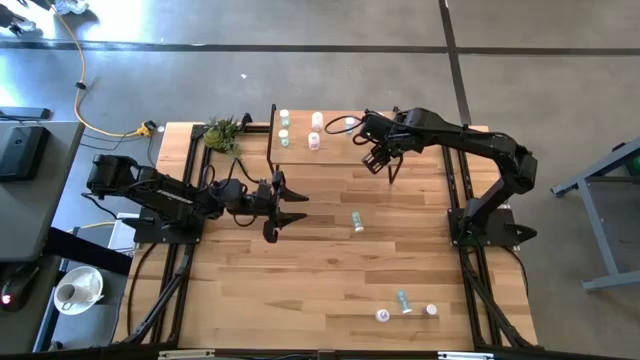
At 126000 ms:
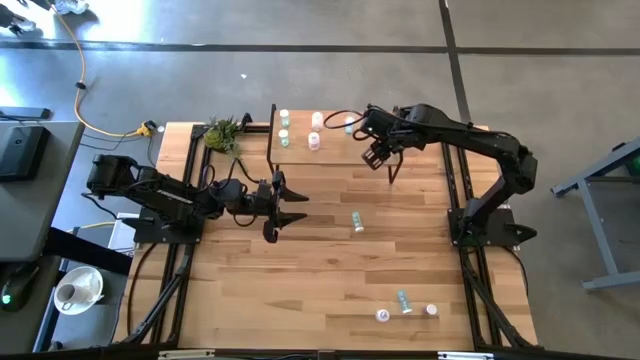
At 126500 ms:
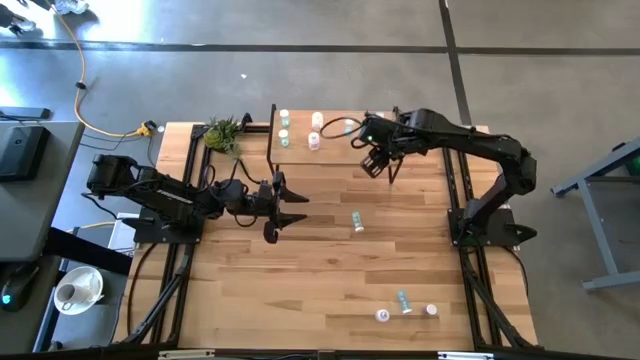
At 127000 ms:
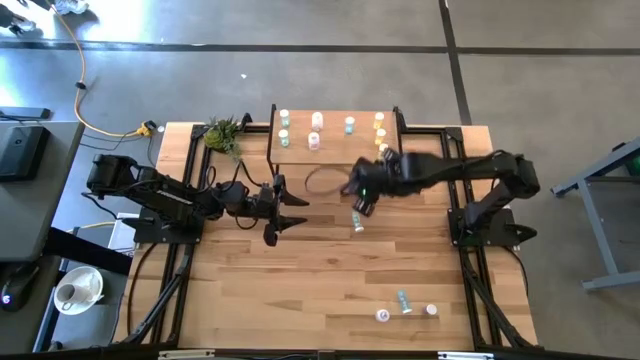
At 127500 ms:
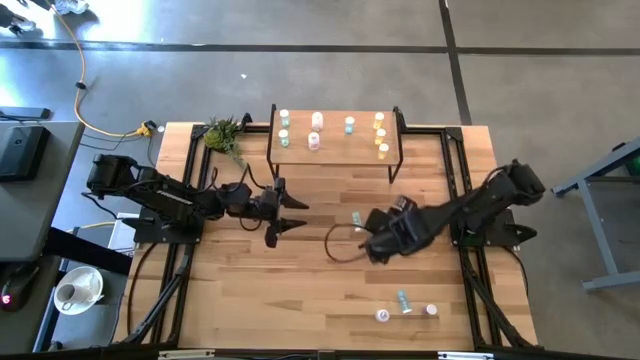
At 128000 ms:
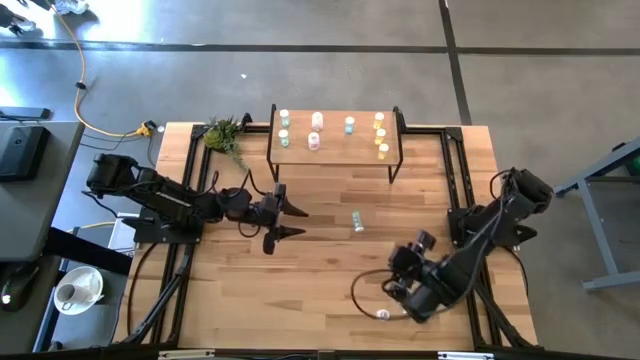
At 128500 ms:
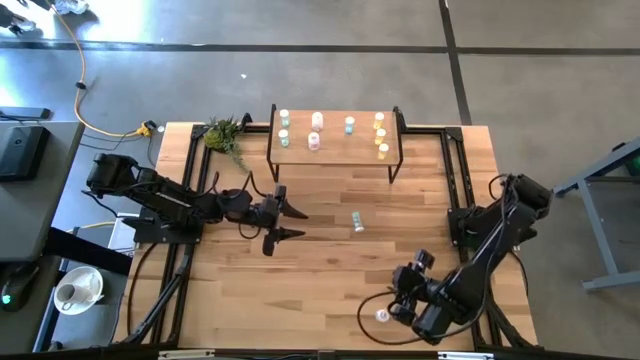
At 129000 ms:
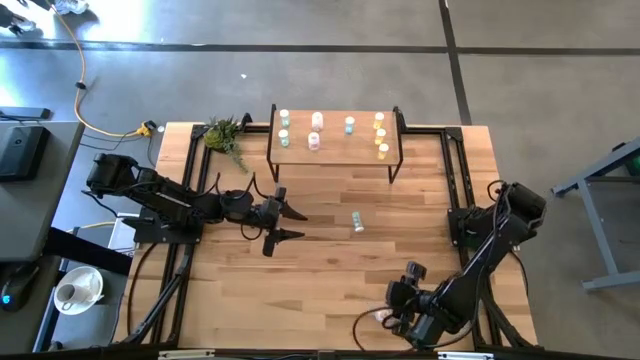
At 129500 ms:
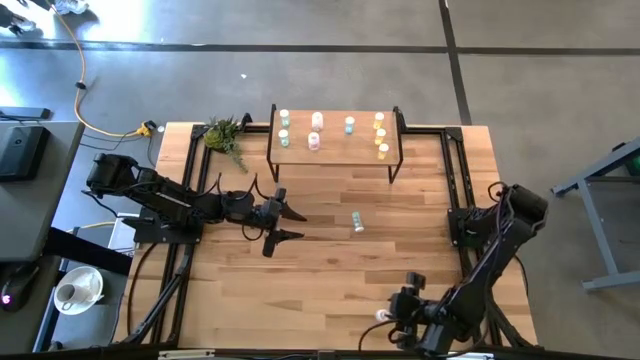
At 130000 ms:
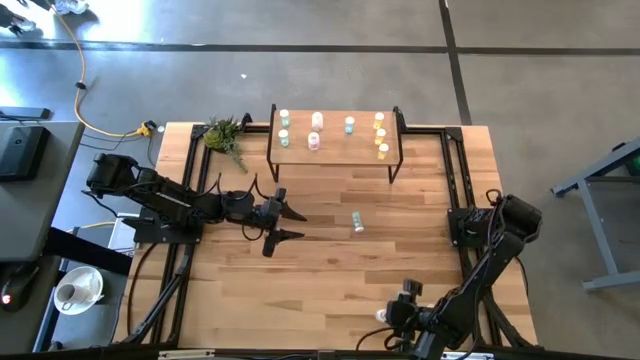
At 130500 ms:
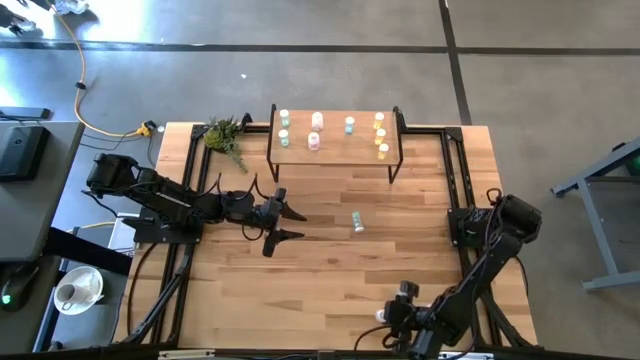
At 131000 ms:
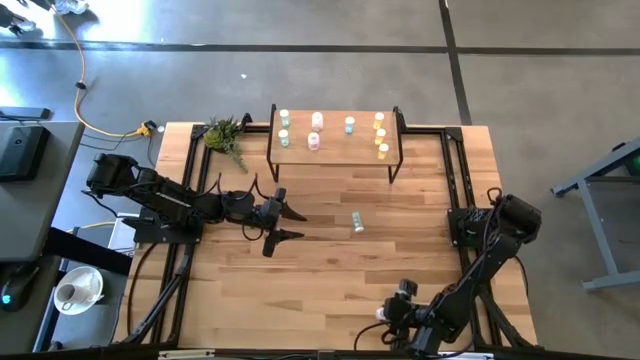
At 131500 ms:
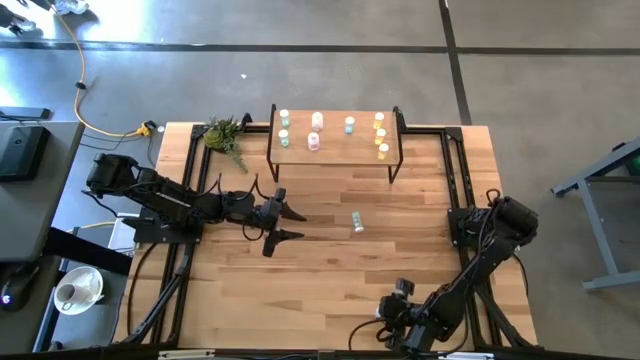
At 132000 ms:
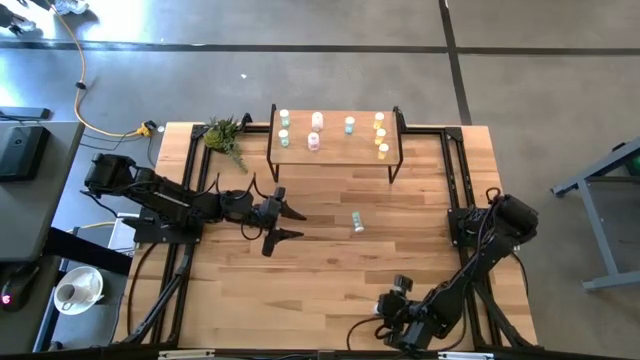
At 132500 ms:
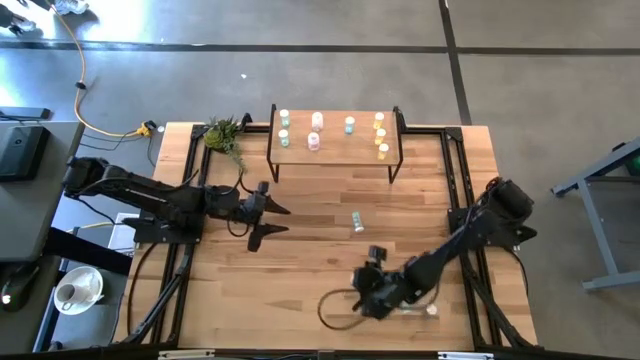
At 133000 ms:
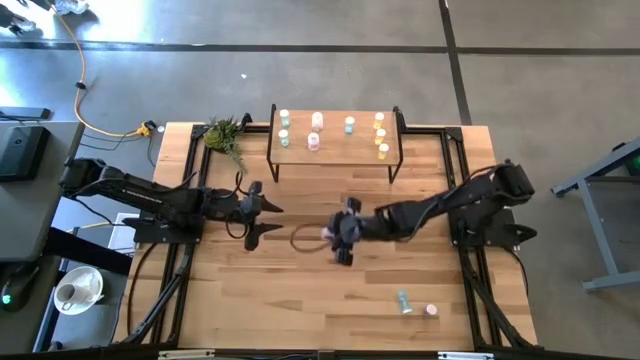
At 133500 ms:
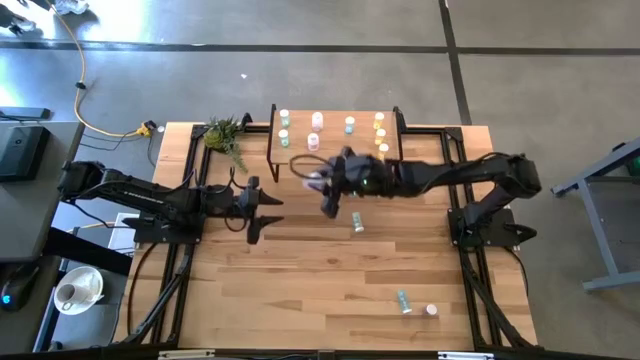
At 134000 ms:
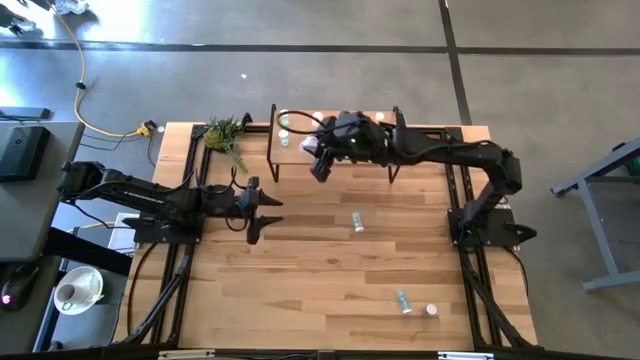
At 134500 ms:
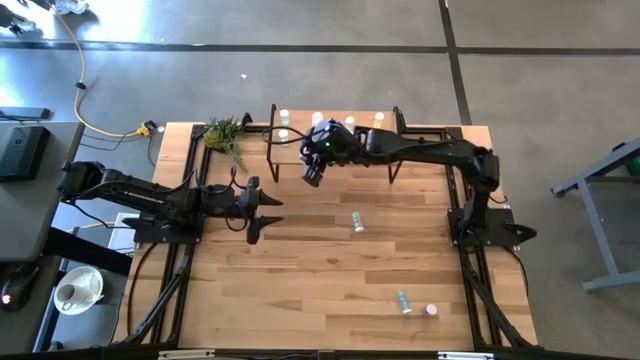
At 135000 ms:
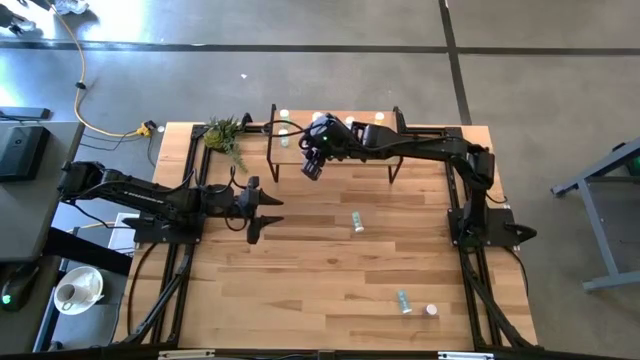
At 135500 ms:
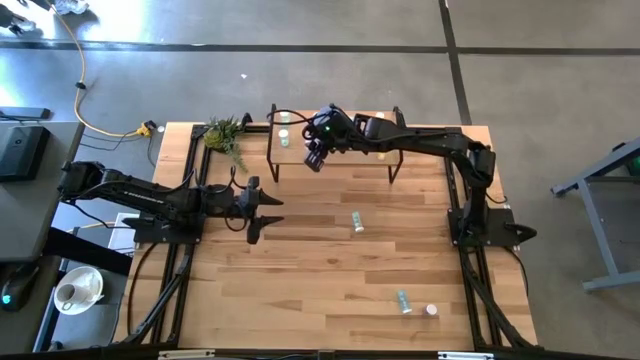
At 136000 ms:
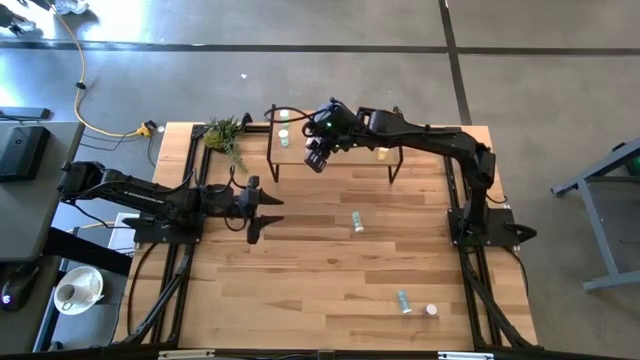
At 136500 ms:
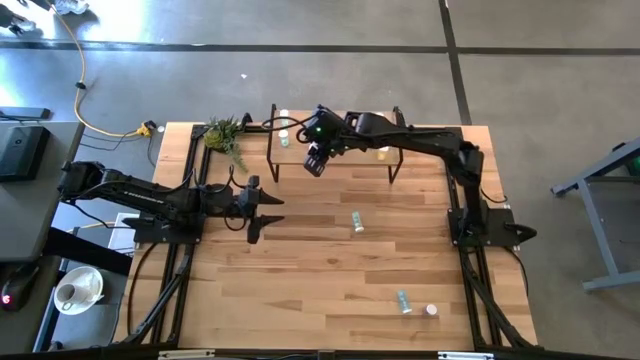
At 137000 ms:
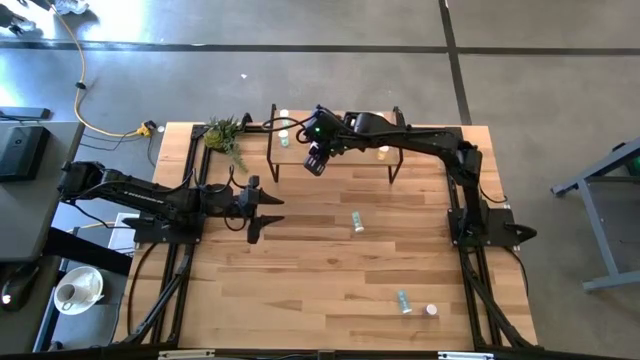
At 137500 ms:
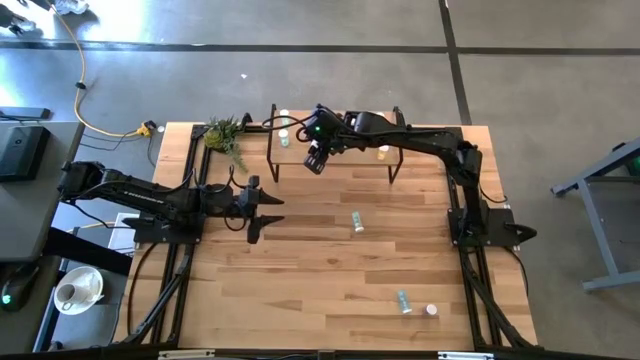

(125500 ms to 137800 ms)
Task: Pick and place medicine bottles onto shelf by color
Put the transparent pill bottle on the shelf aligned with the other transparent pill bottle

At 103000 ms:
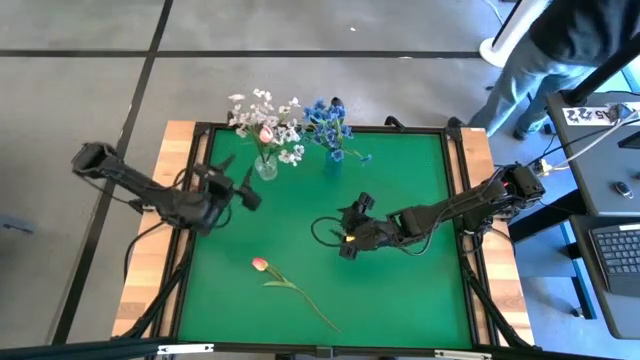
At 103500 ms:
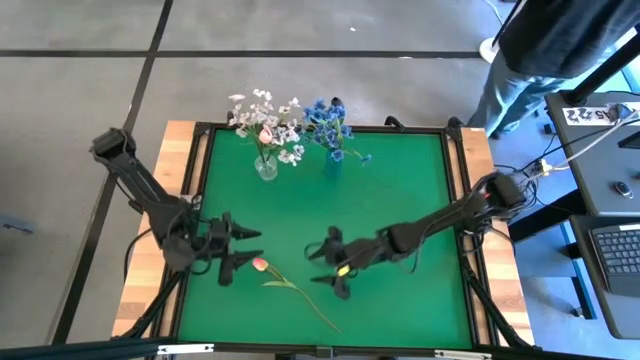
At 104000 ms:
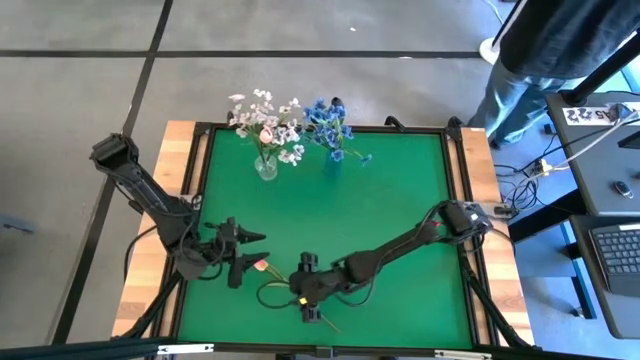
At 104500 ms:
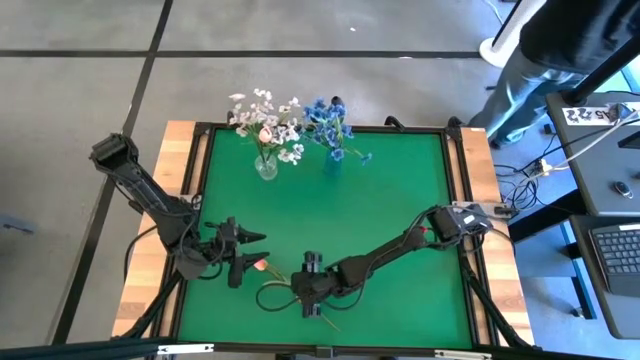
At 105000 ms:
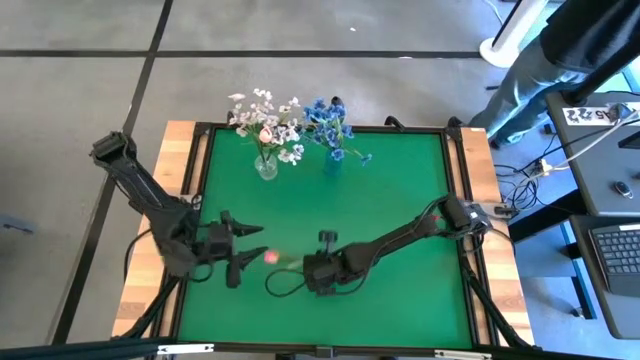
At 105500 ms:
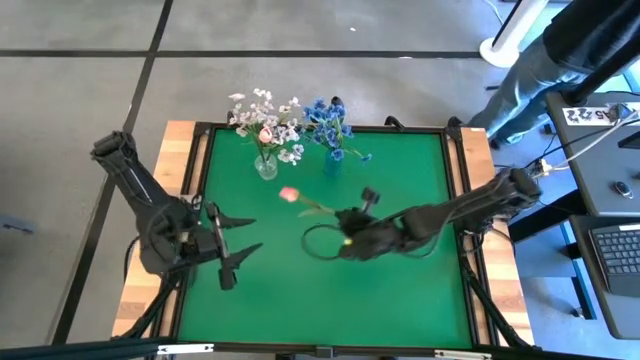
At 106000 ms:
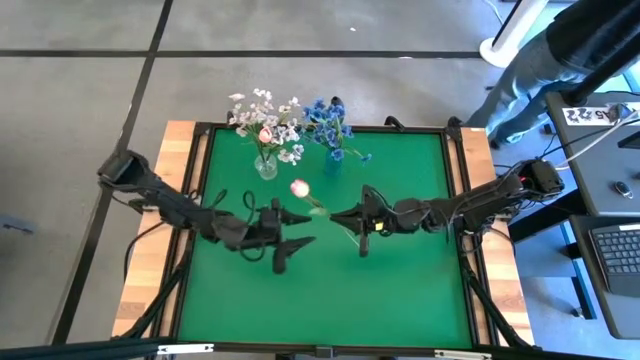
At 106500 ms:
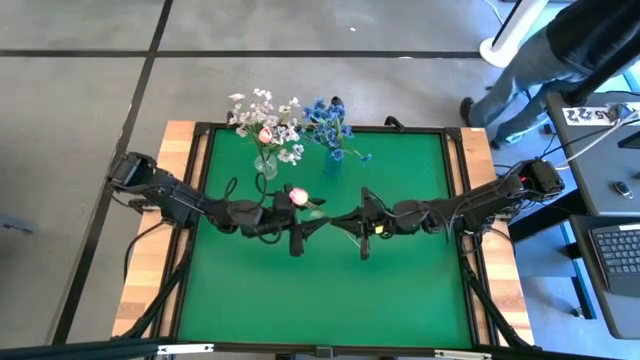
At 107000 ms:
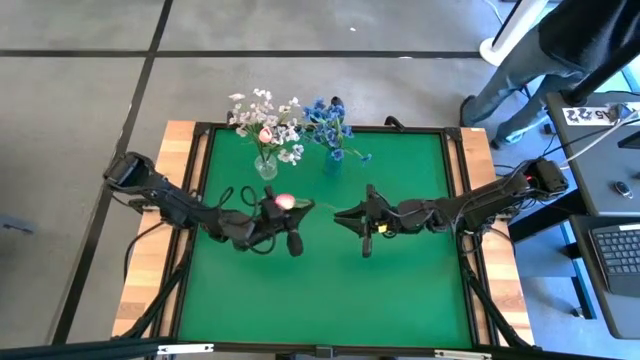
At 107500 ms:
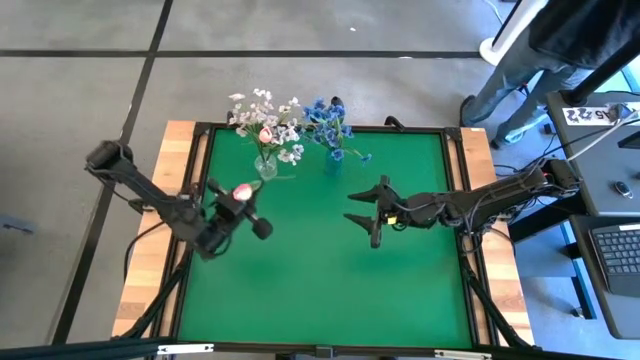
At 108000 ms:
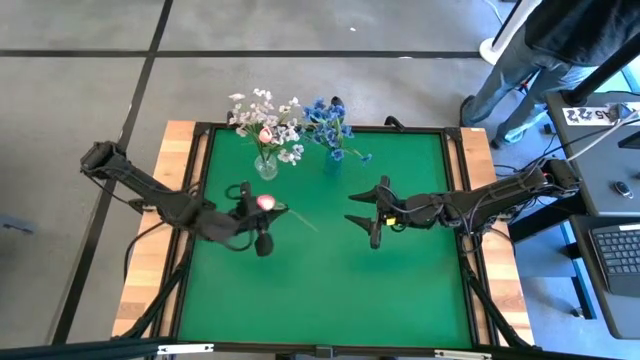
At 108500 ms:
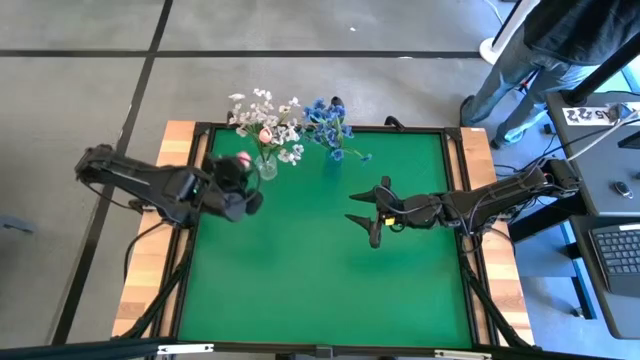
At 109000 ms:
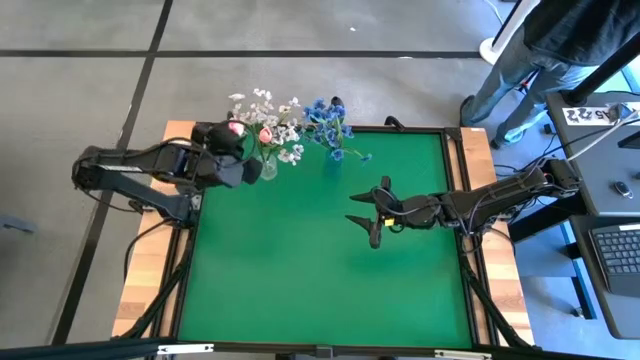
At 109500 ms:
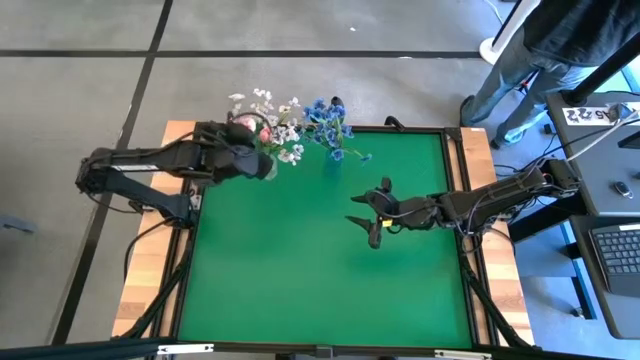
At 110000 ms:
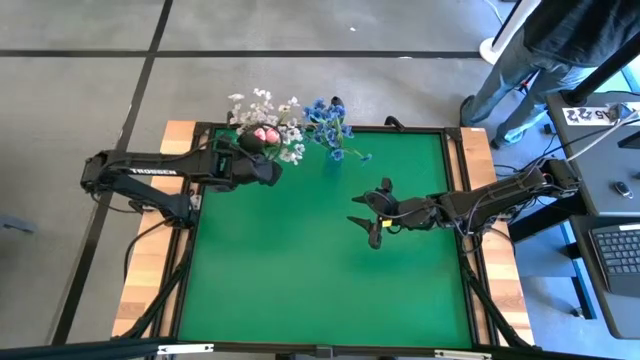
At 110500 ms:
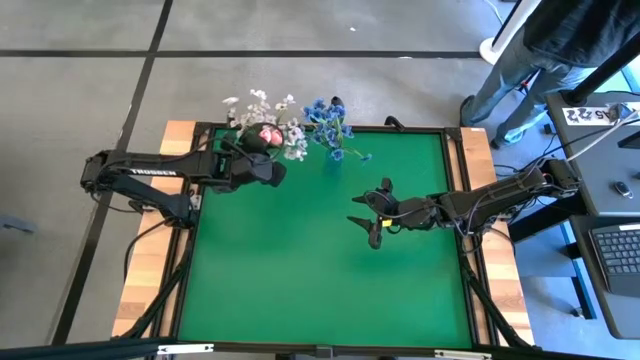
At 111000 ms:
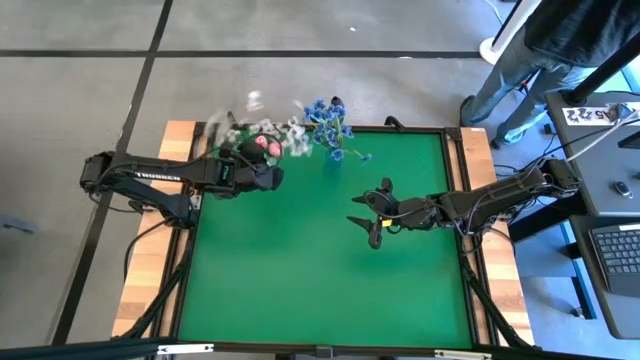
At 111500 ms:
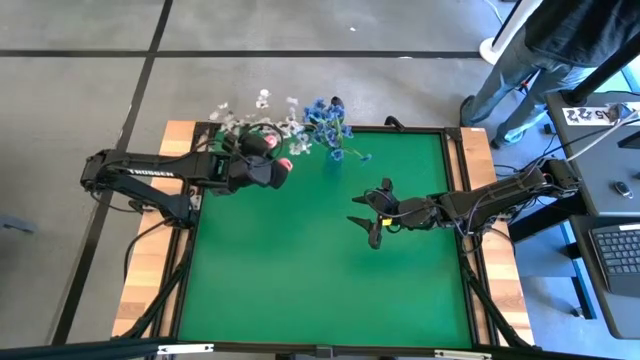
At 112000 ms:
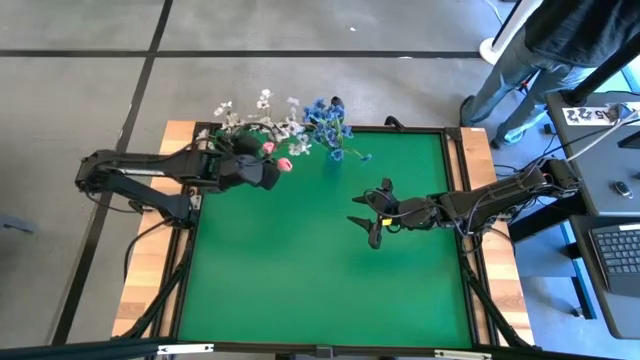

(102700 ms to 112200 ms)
Task: Sort flowers into vase by color
Put the pink flower into the transparent vase
